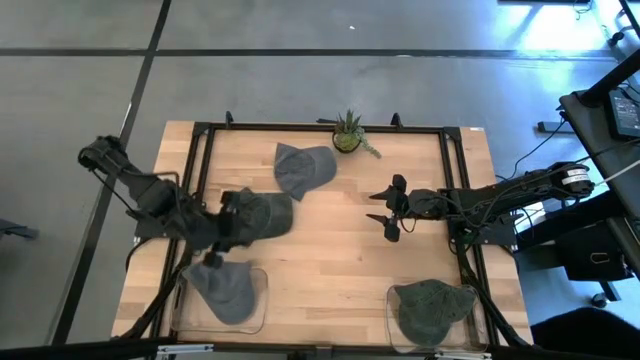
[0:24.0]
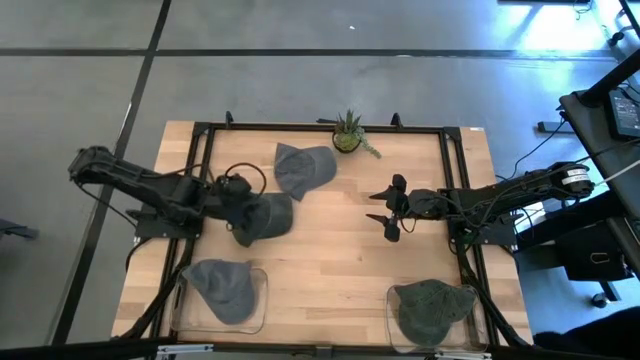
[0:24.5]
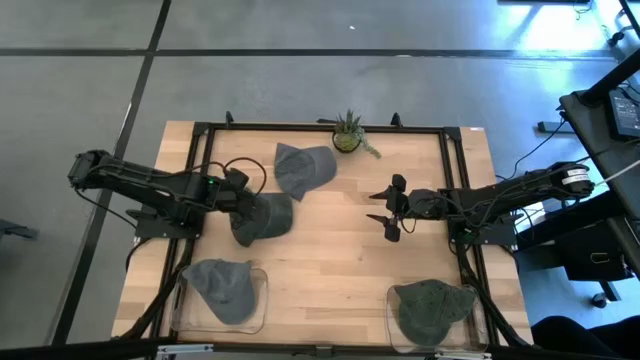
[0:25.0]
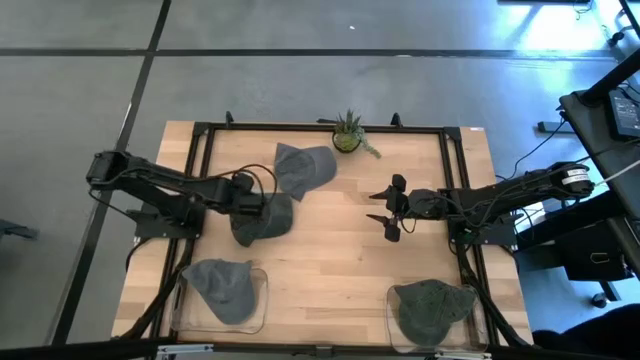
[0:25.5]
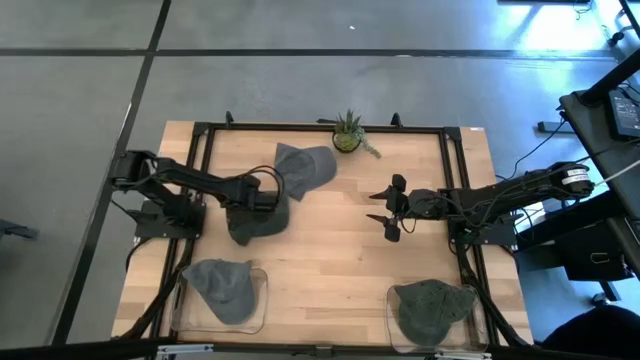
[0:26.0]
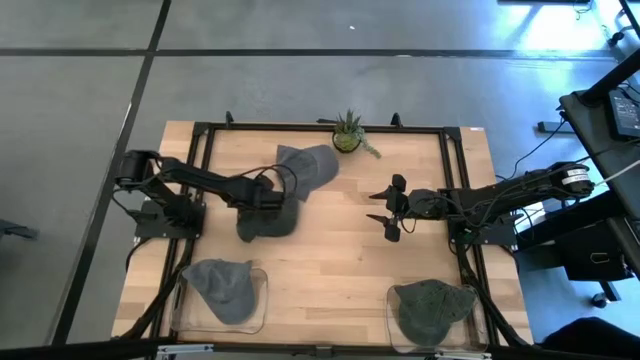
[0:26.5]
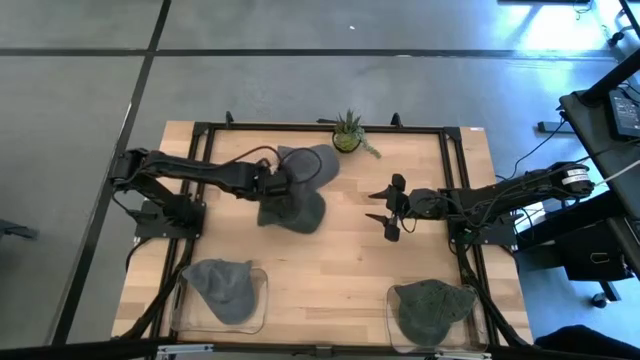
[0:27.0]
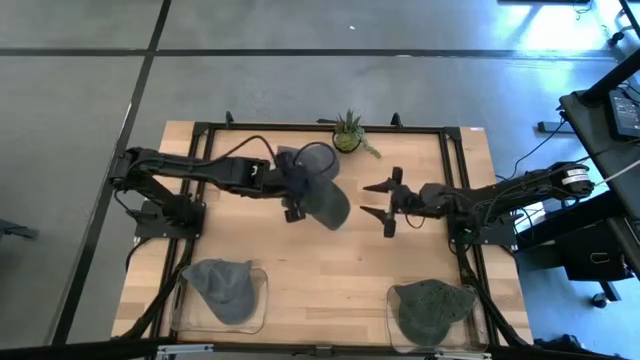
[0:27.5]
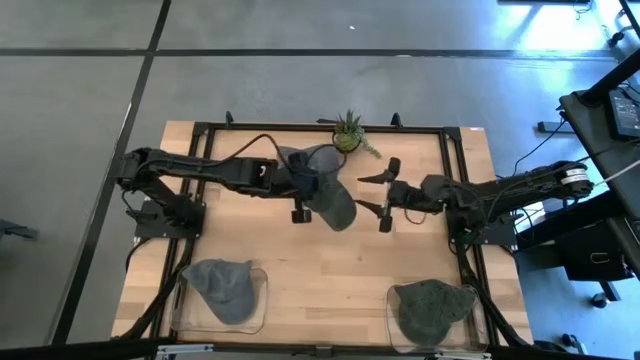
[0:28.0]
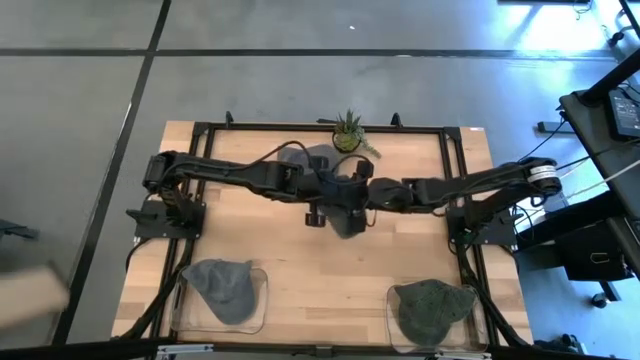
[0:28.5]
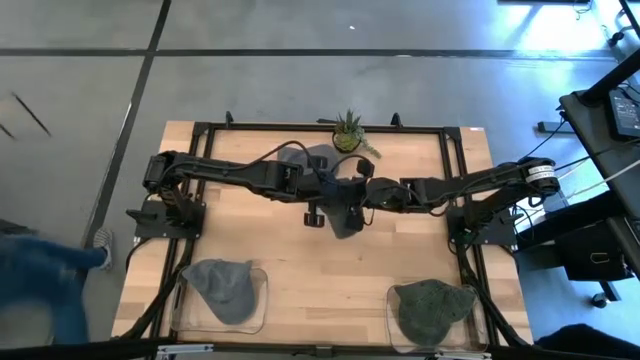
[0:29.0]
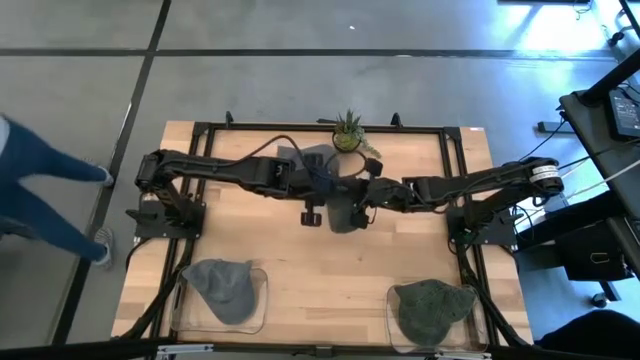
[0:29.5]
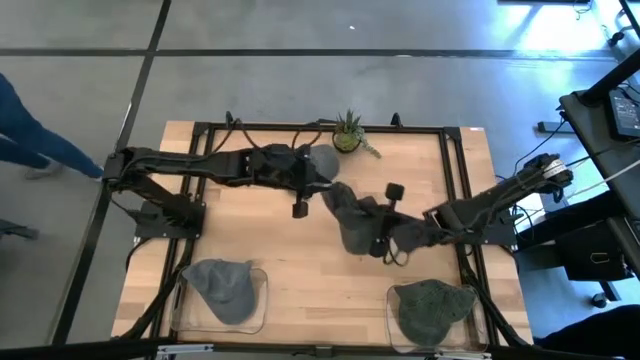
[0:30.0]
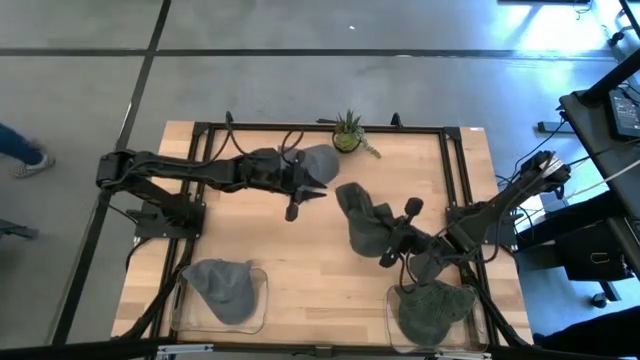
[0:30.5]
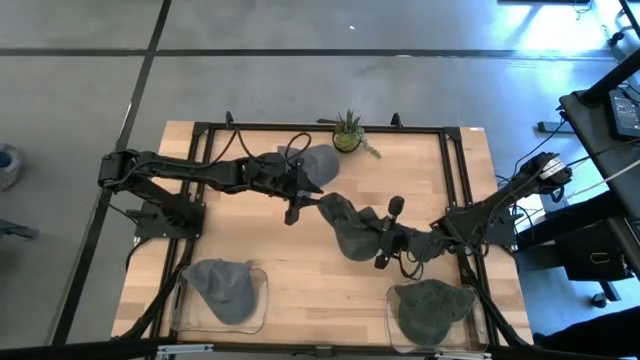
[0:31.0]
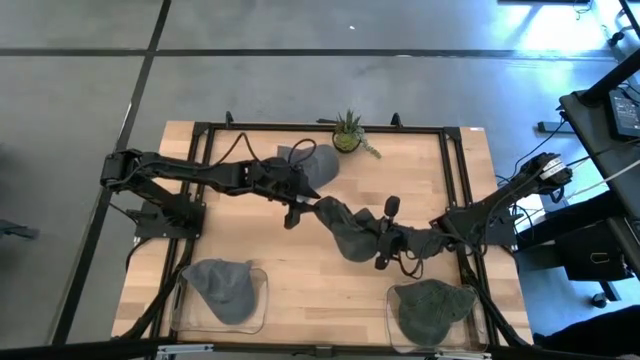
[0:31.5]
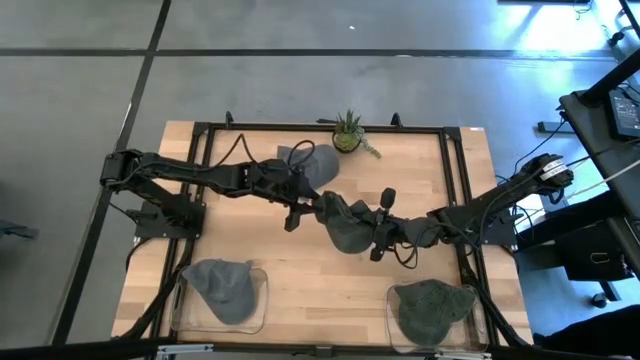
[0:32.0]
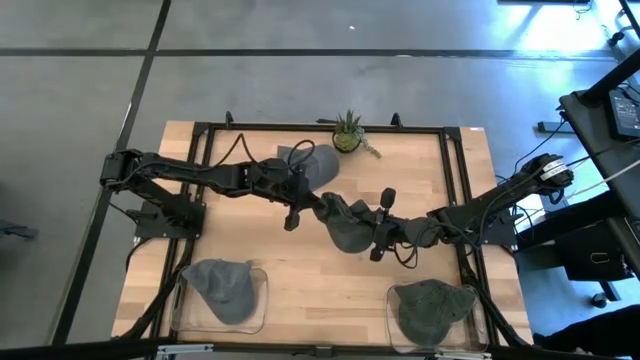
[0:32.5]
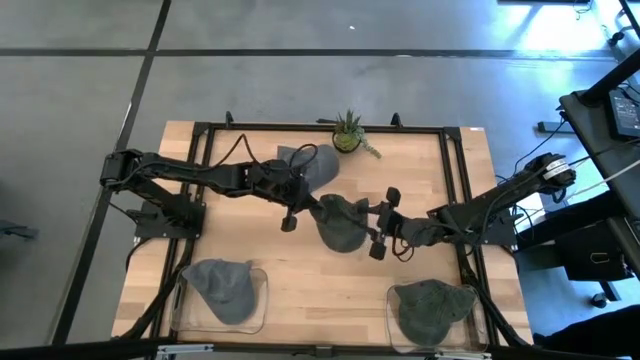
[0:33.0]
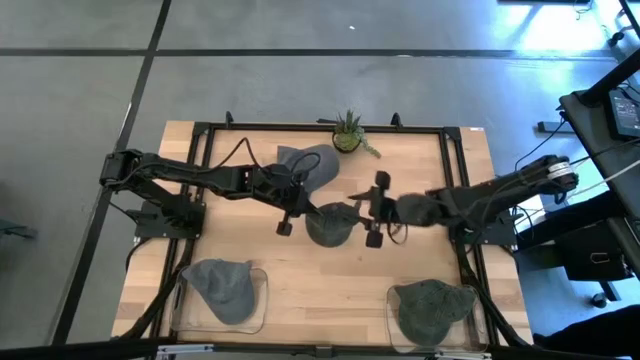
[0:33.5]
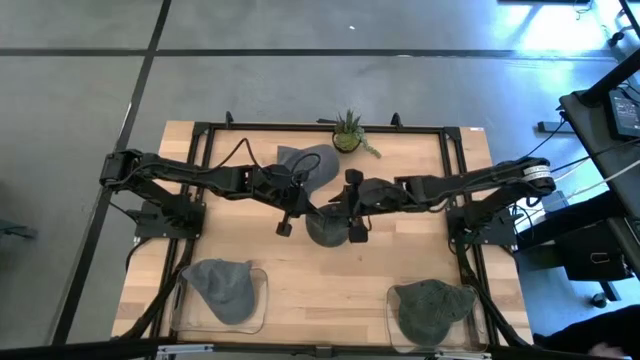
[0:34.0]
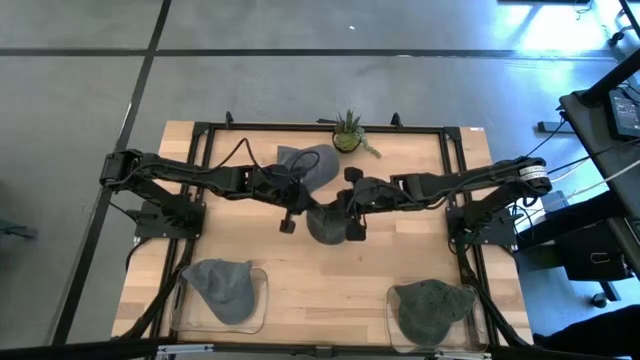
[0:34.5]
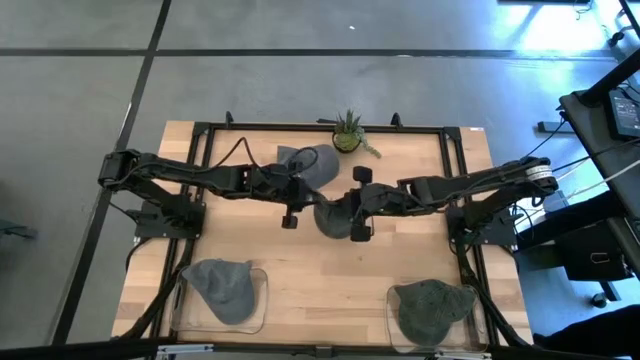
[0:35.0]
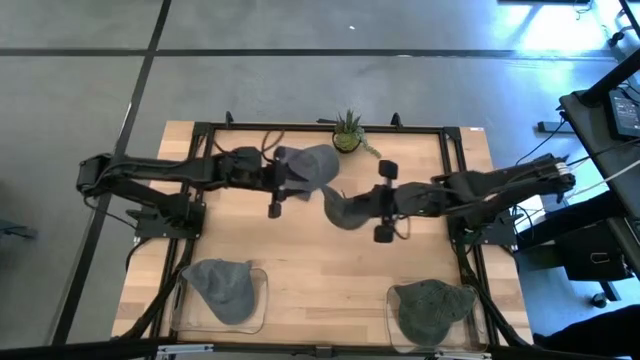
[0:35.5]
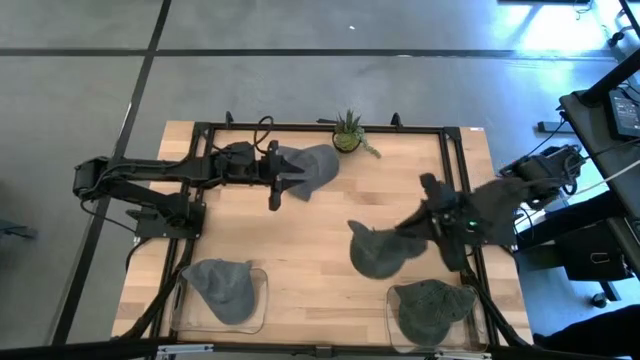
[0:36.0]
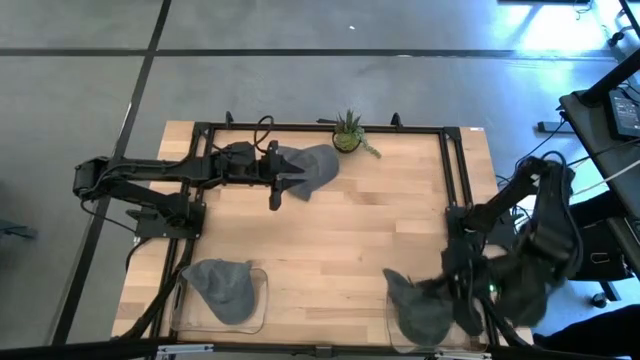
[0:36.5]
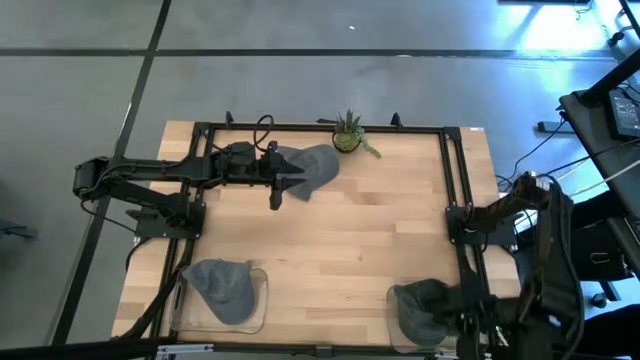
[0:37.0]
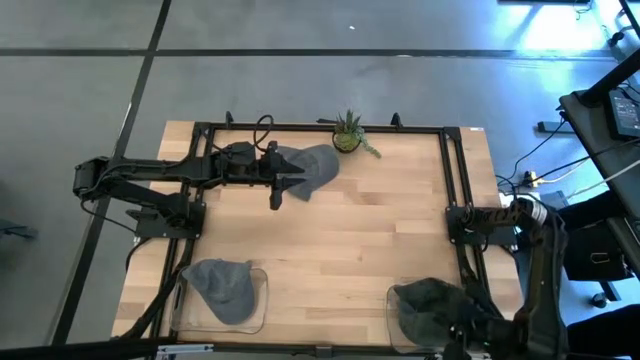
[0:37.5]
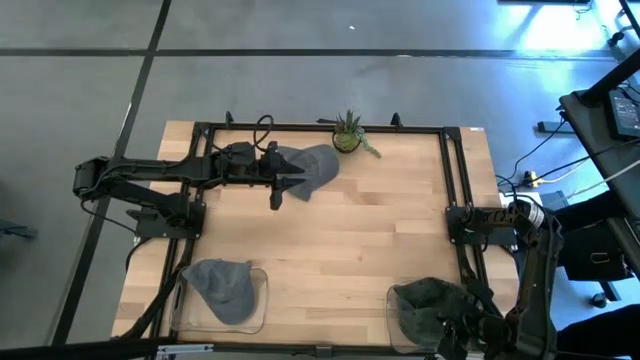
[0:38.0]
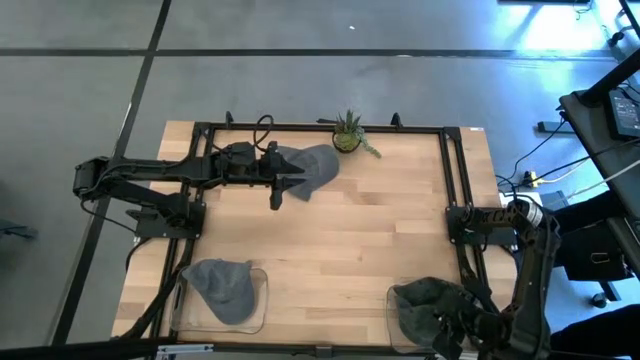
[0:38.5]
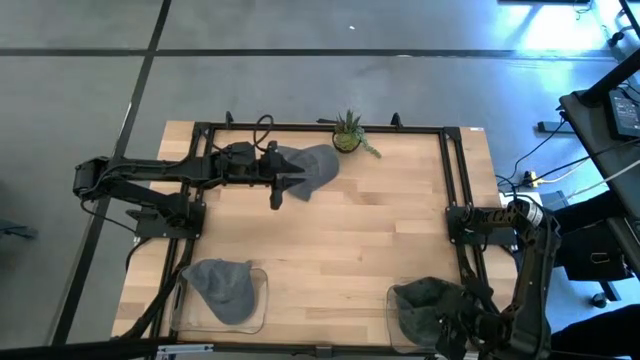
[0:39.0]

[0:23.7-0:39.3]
Task: Pick & Place hat
Put the black cap into the right transparent bin

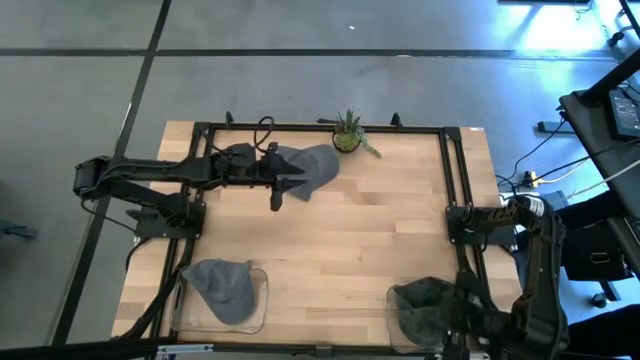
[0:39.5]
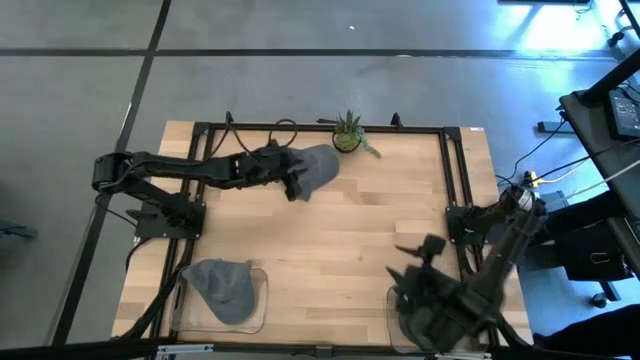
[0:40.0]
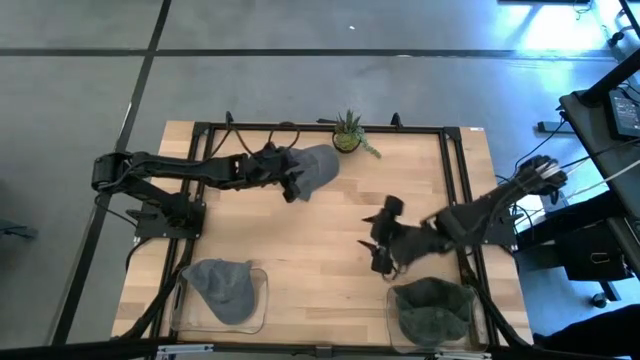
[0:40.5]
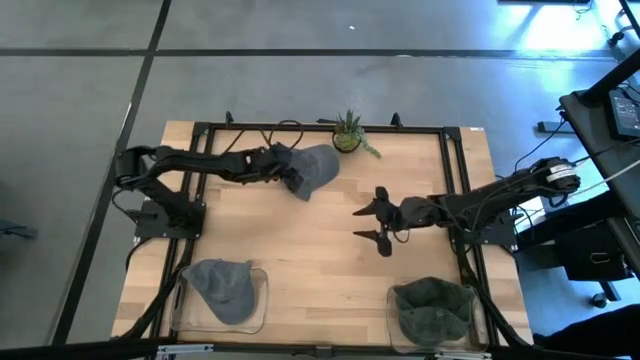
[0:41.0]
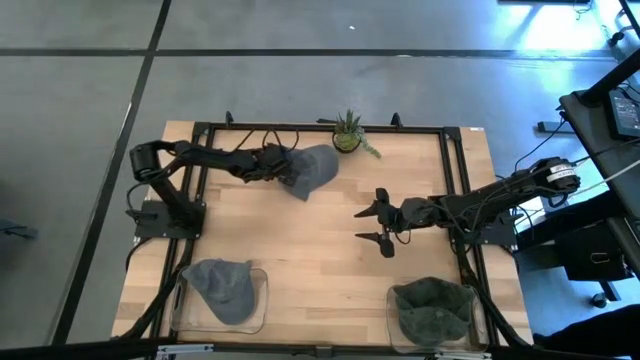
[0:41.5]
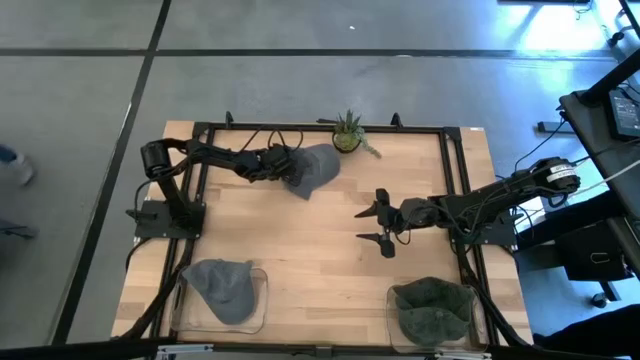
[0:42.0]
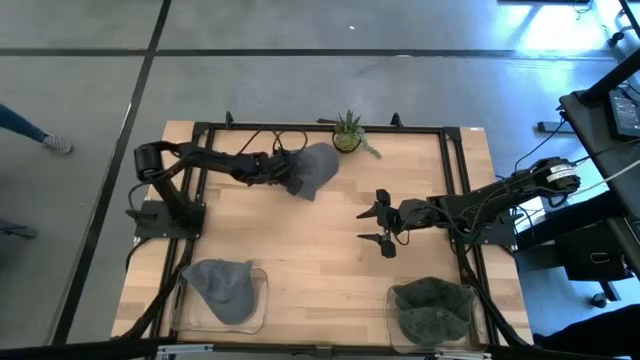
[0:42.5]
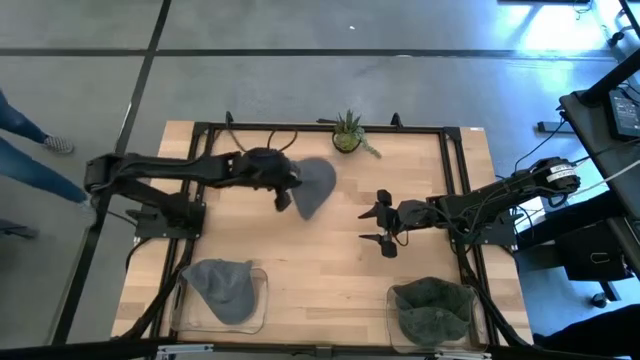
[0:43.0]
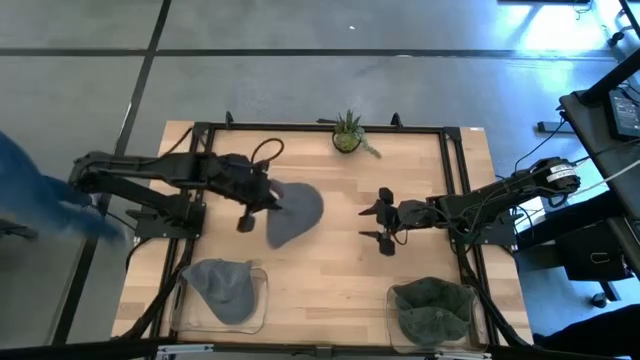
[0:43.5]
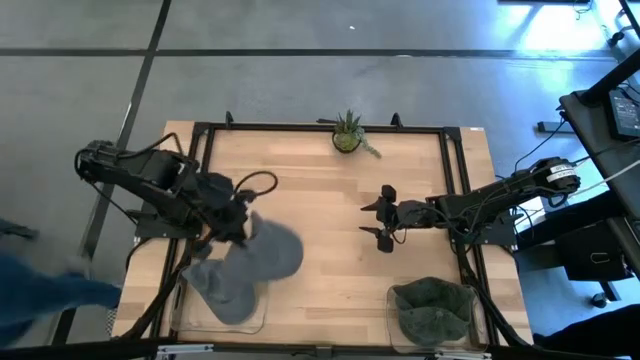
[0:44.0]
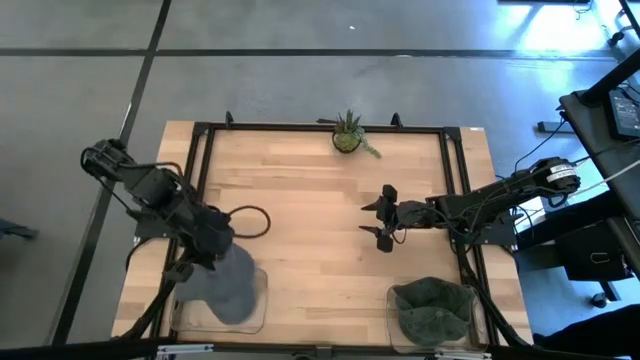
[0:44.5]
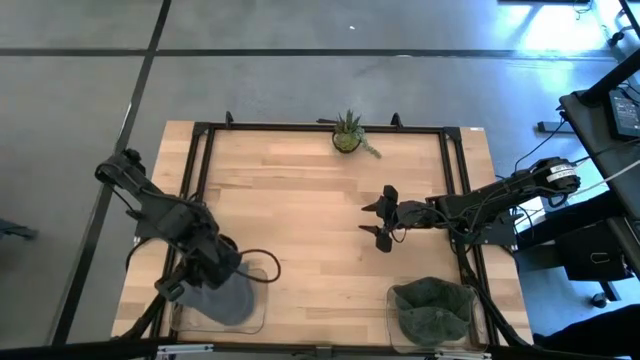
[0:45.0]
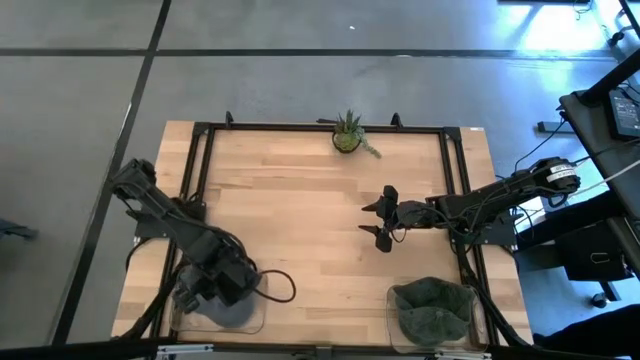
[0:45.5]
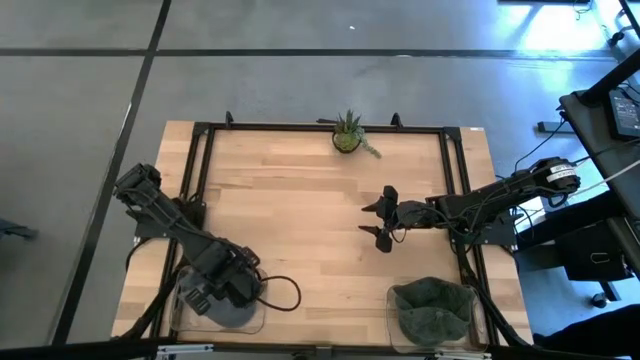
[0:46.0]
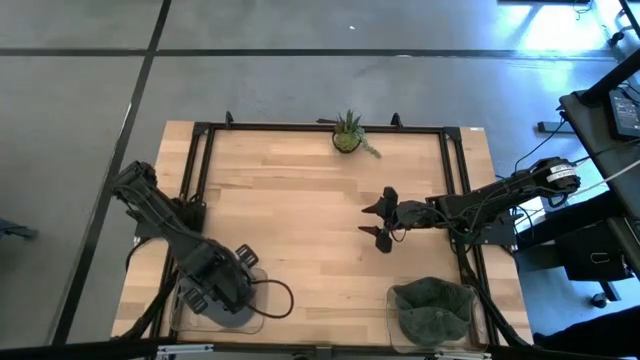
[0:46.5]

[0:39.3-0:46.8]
Put the grey cap into the left transparent bin
